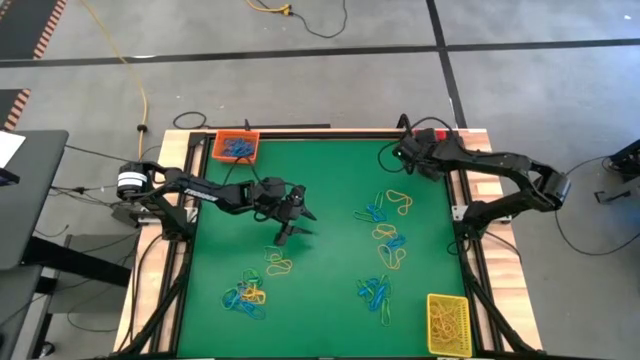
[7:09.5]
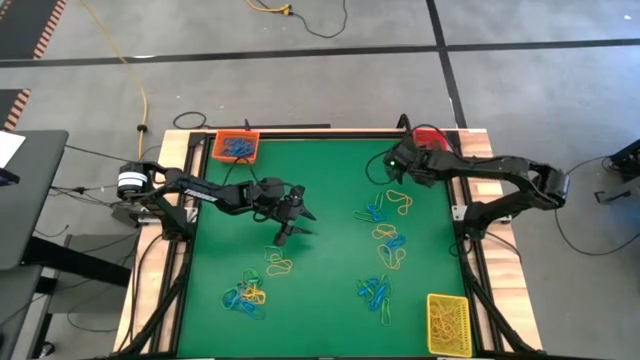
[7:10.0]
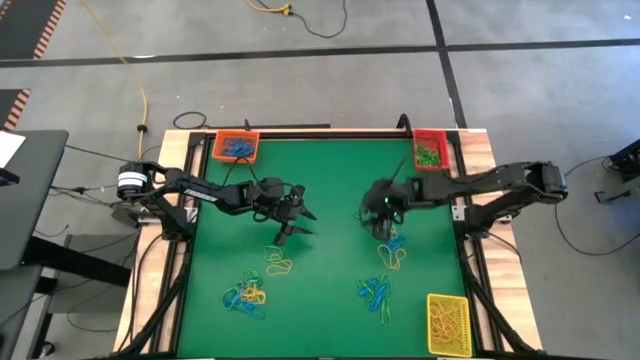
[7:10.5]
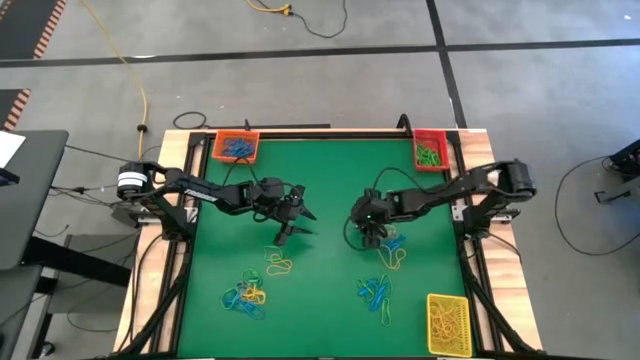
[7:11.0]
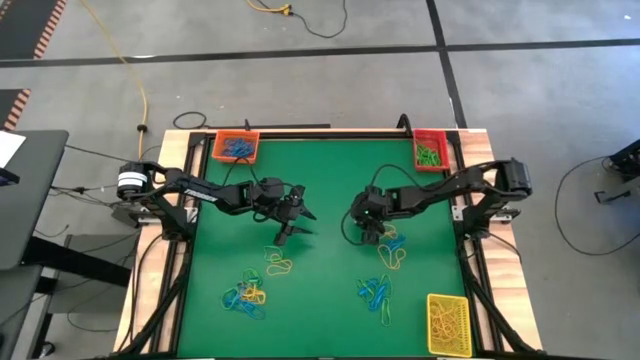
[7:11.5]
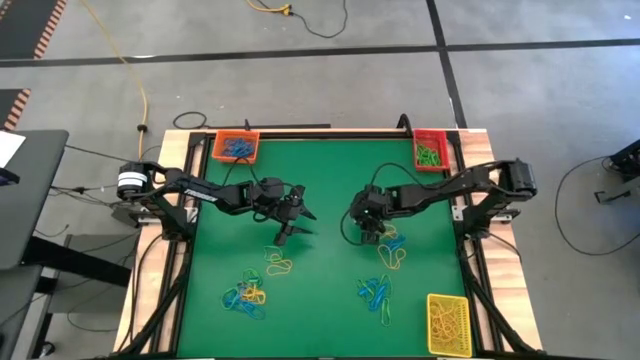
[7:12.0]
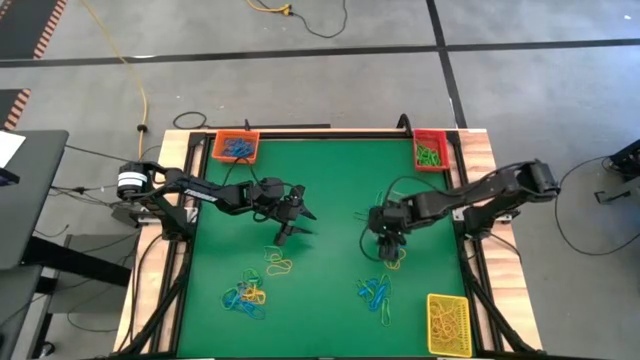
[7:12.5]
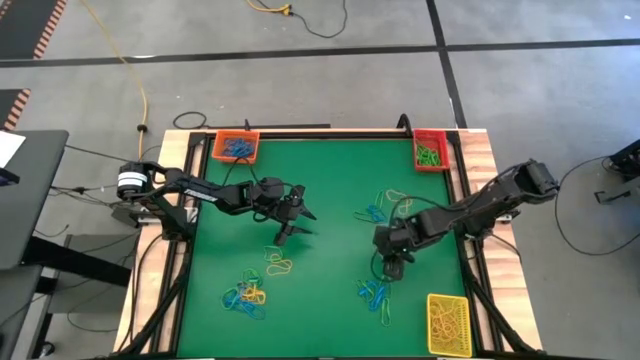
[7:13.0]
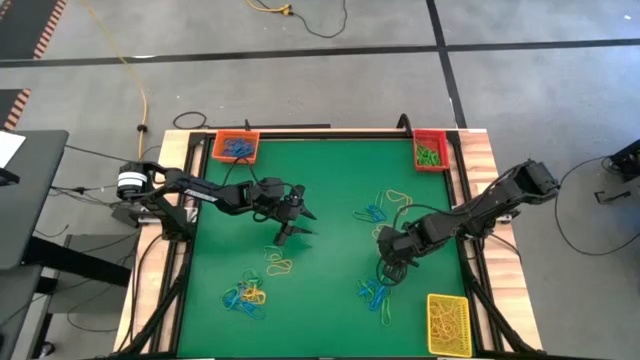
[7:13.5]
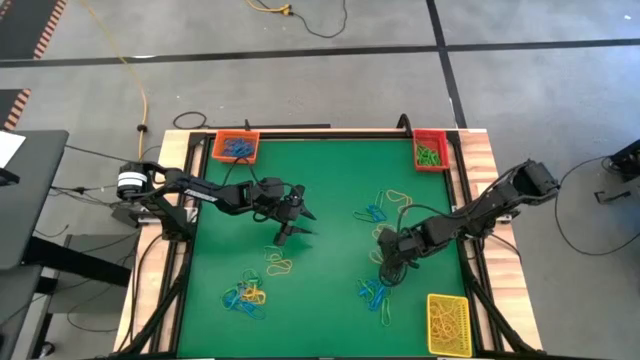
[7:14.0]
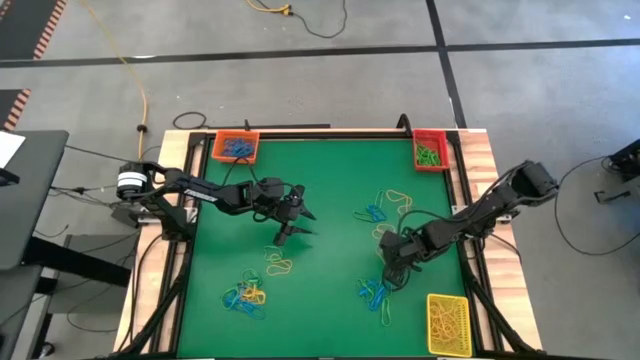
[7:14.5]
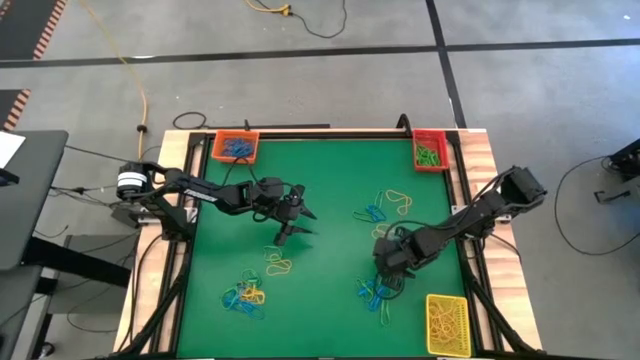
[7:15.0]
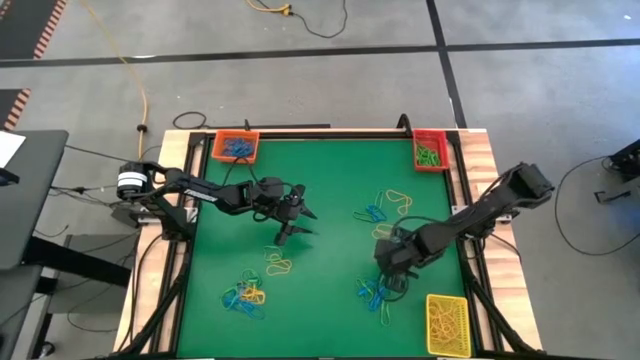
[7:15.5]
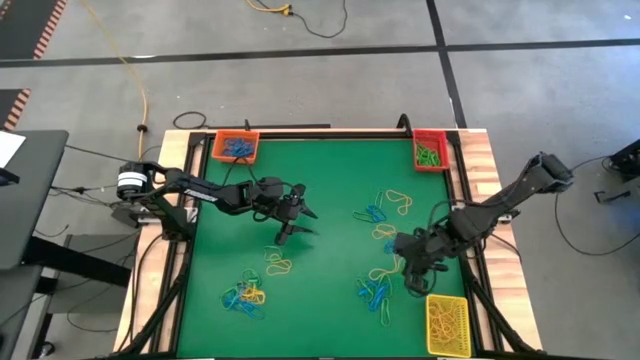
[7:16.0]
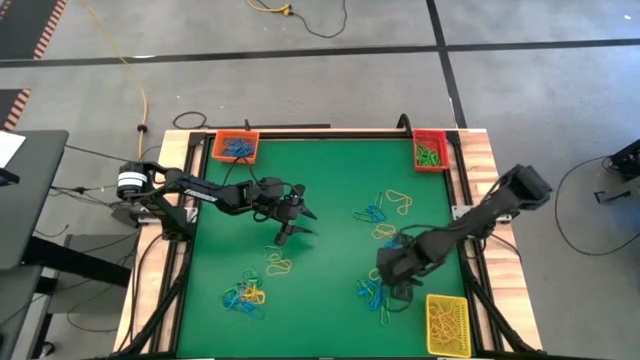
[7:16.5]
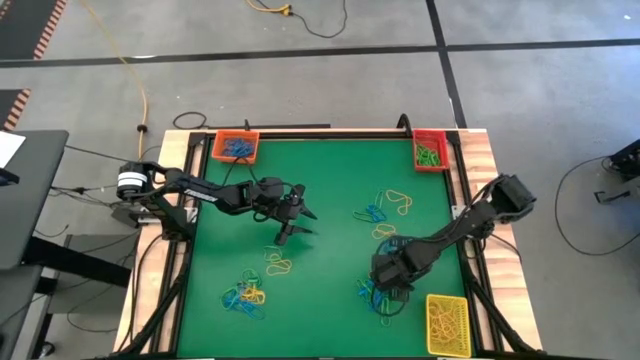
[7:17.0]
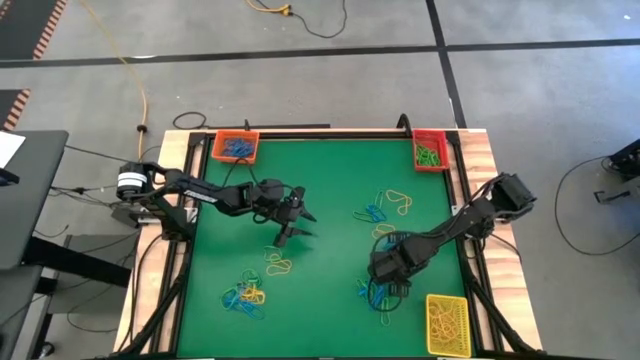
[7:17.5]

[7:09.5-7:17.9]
Task: Sort rubber bands into baskets
Put the top right yellow rubber band into the yellow bin

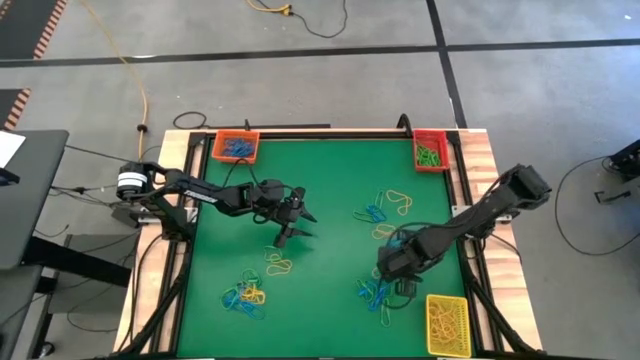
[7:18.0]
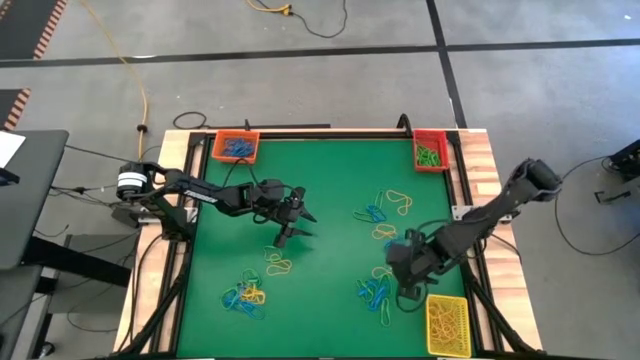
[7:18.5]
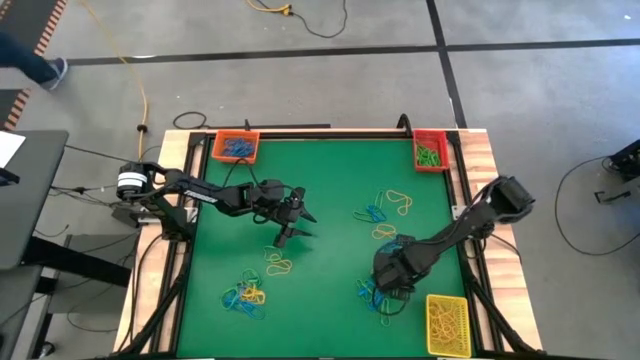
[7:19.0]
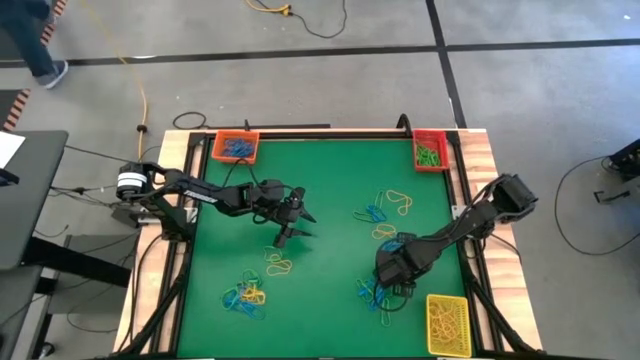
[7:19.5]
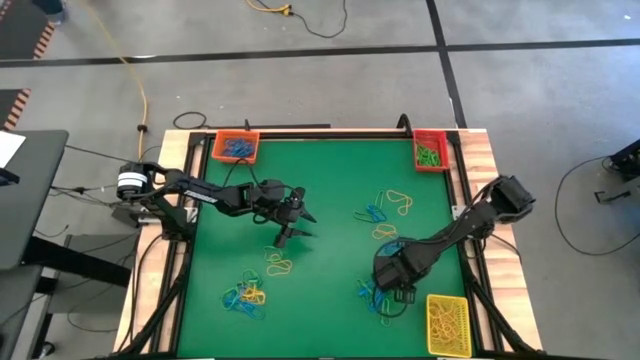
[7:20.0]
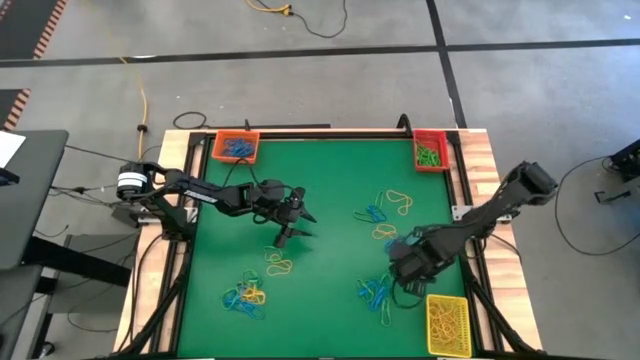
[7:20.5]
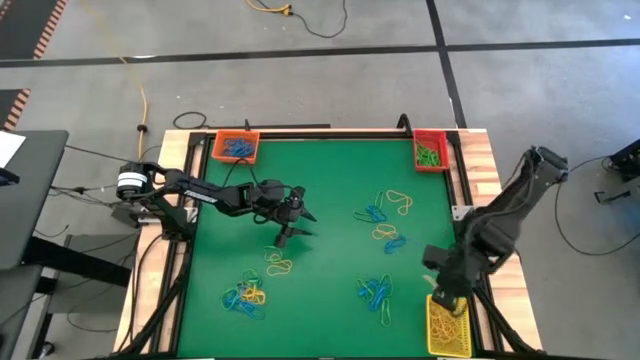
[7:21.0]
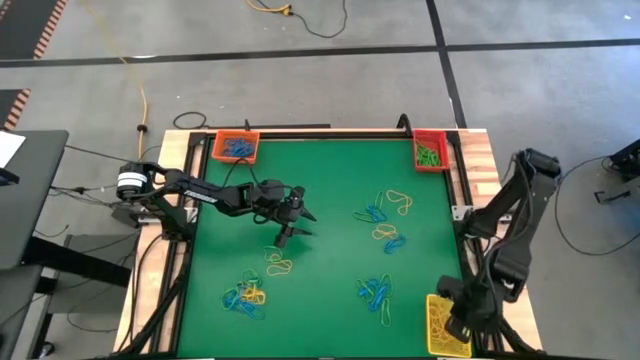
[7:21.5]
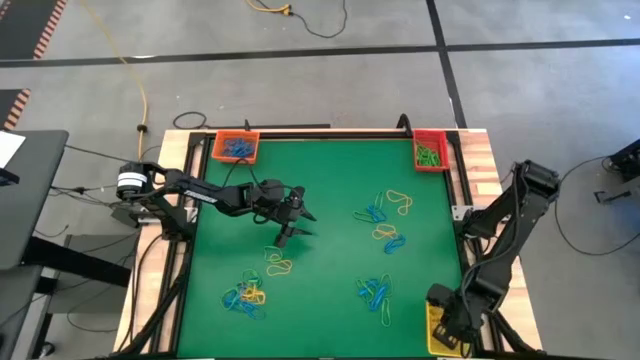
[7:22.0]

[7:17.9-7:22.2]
Put the top right yellow rubber band into the yellow bin

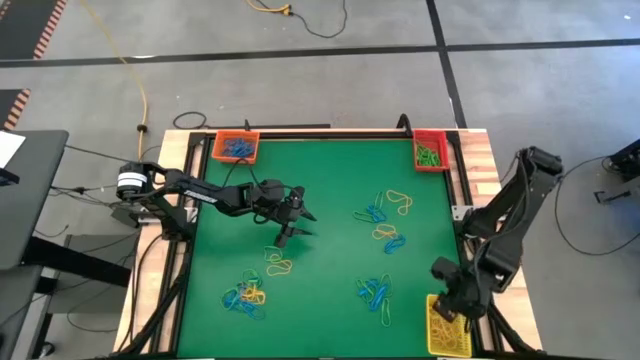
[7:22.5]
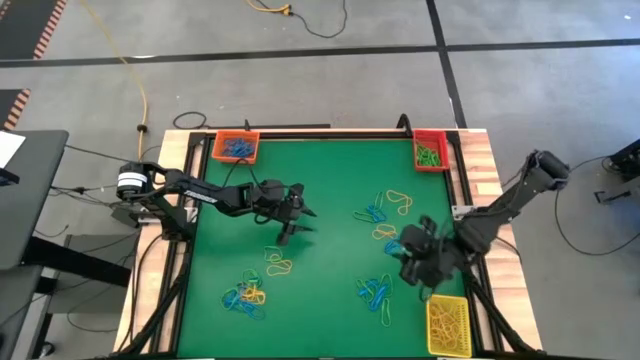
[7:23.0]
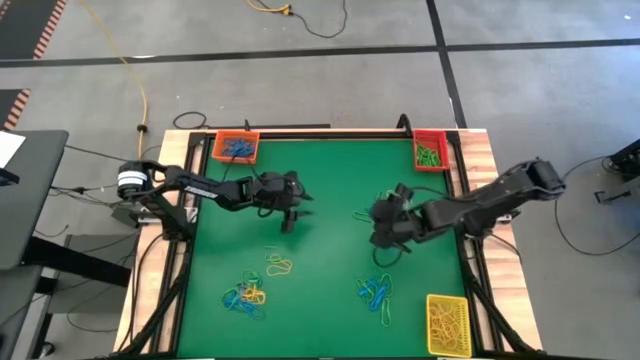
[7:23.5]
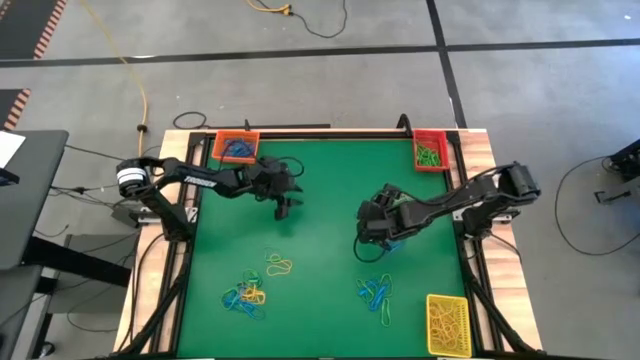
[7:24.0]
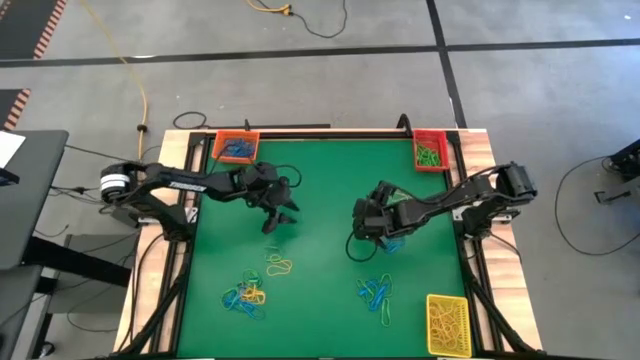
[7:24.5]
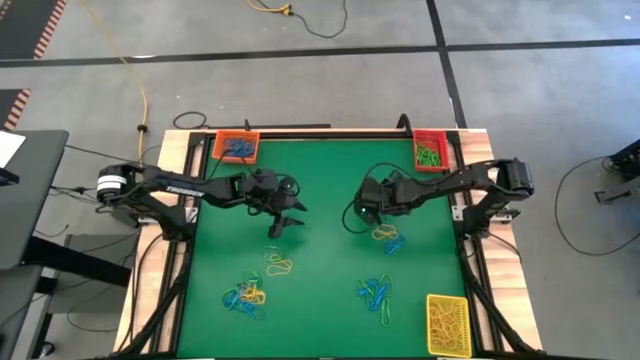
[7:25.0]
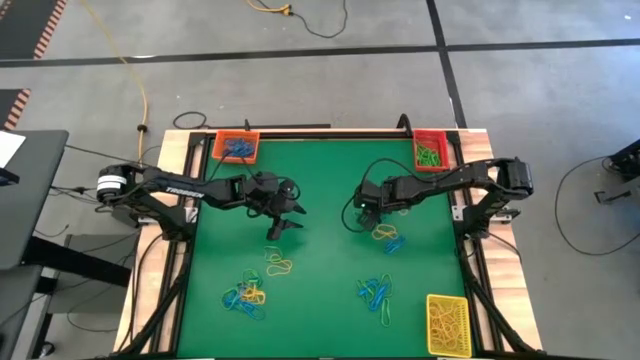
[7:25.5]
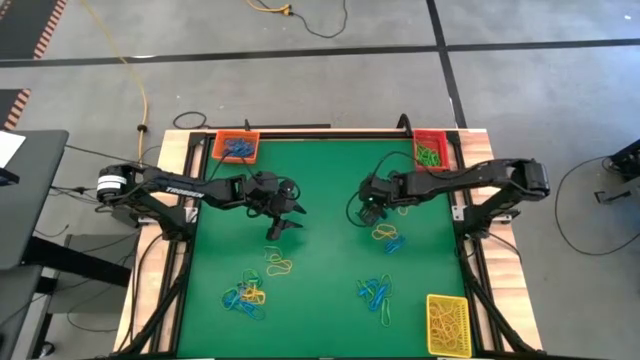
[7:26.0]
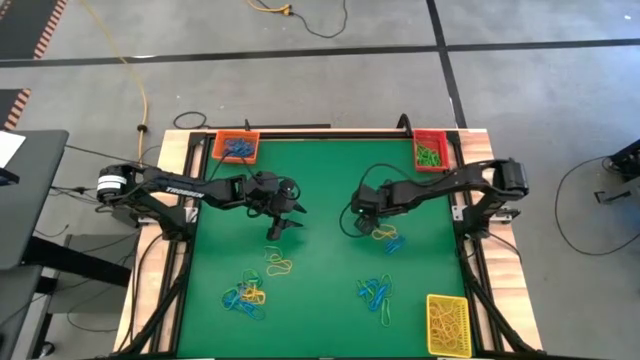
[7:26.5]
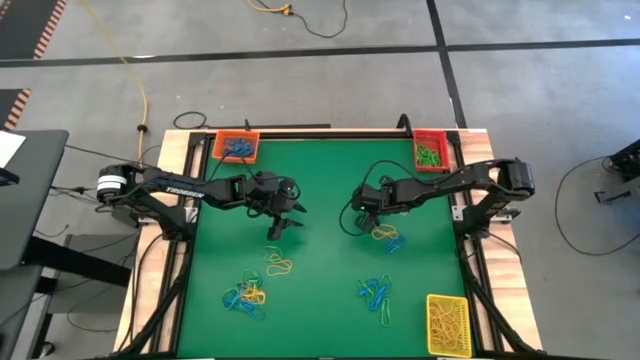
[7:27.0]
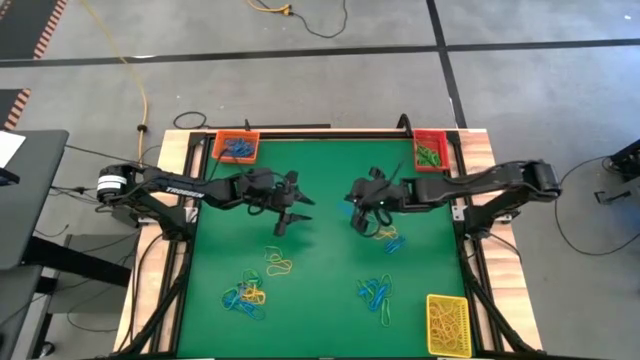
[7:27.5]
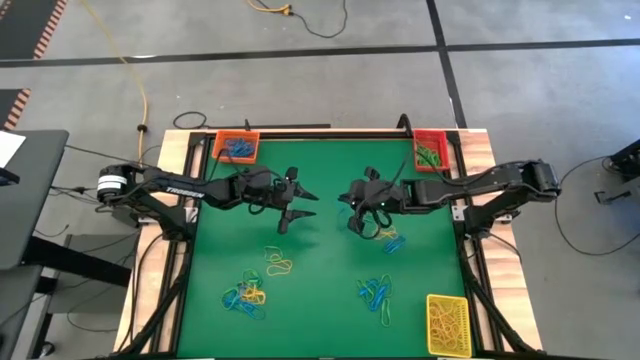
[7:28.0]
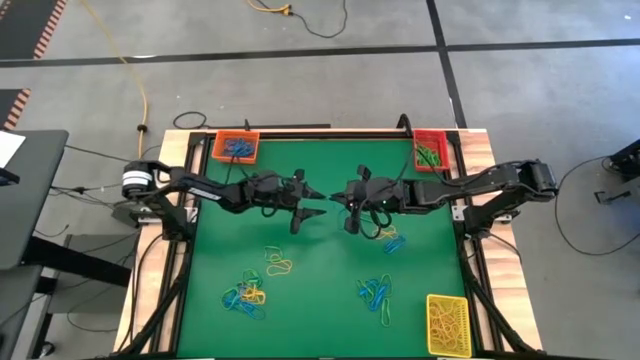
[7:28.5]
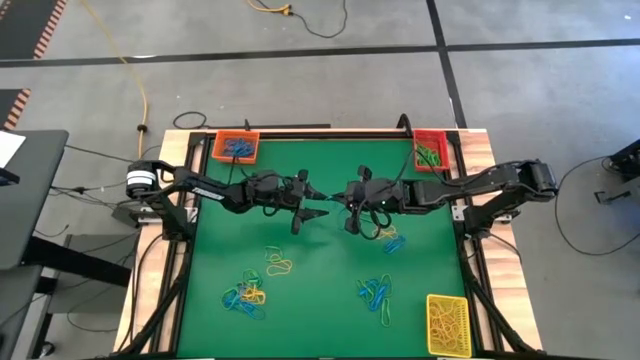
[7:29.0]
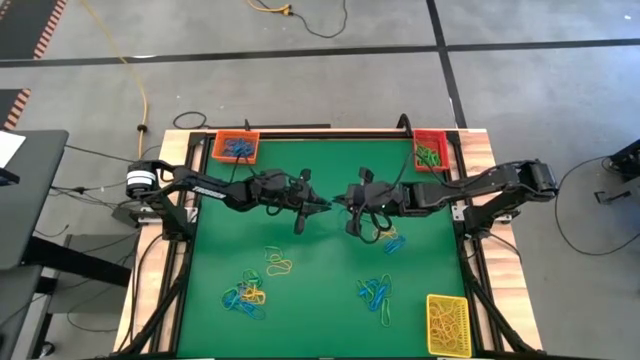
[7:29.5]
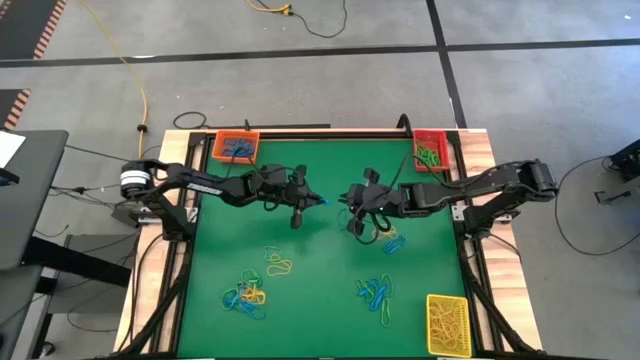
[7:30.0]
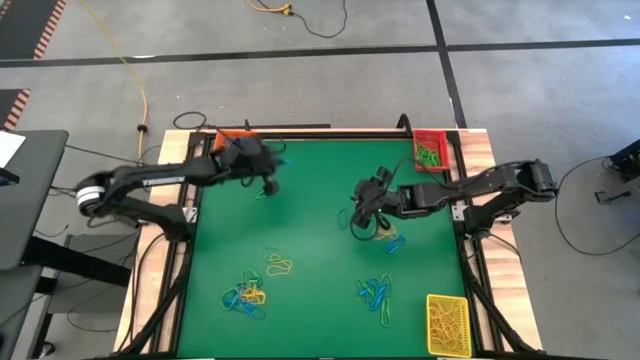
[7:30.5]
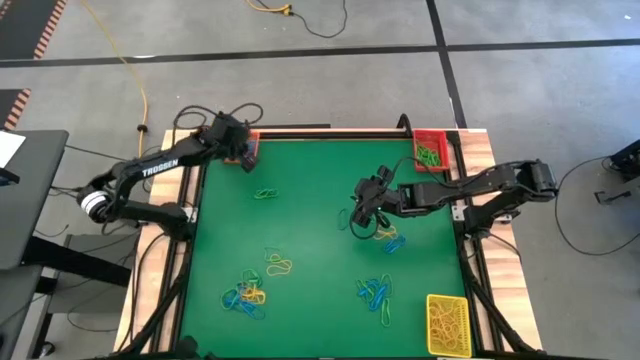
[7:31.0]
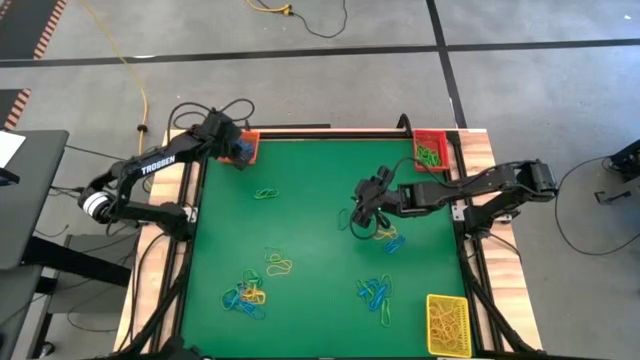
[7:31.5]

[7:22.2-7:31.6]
Put the top right blue rubber band into the orange bin
